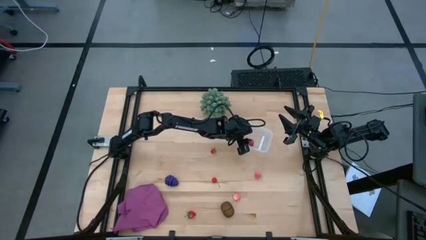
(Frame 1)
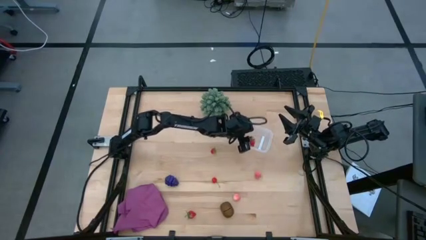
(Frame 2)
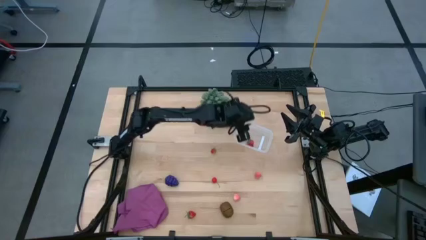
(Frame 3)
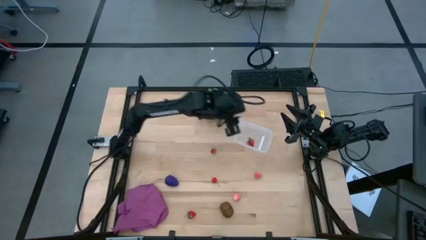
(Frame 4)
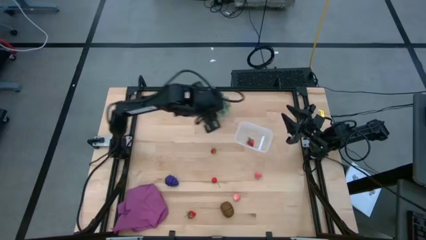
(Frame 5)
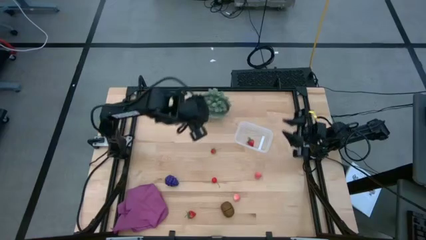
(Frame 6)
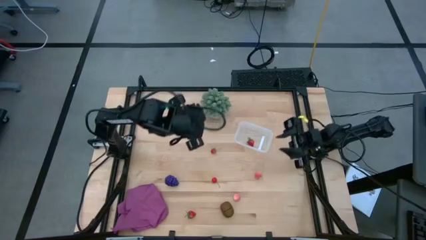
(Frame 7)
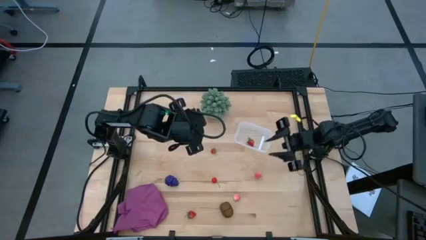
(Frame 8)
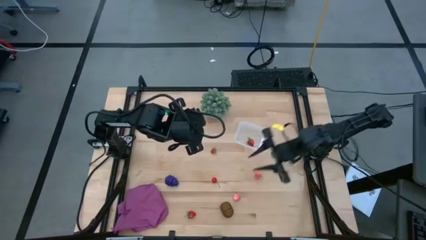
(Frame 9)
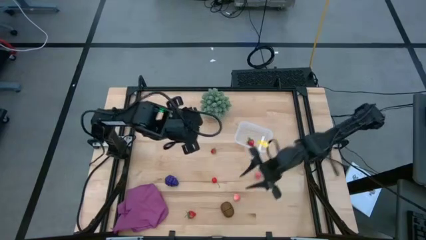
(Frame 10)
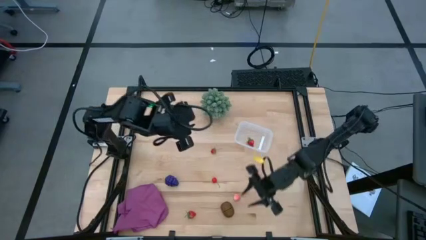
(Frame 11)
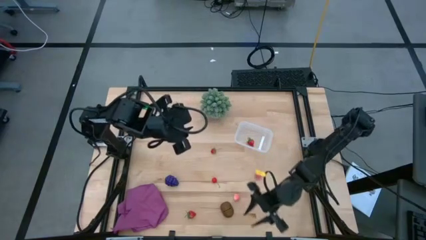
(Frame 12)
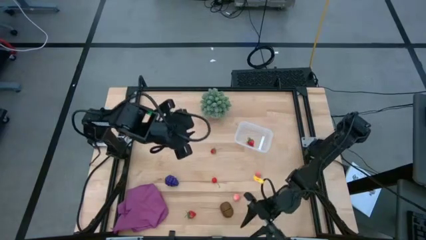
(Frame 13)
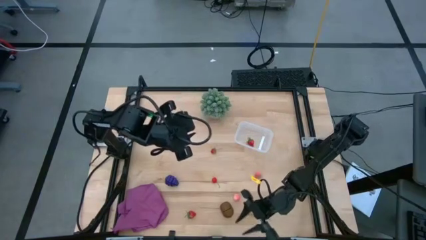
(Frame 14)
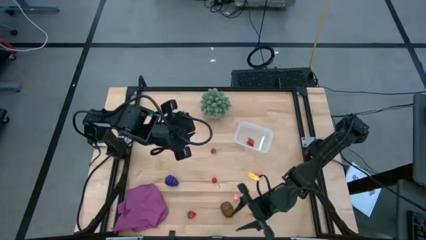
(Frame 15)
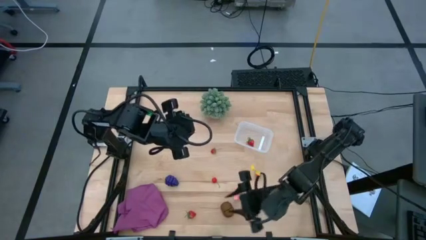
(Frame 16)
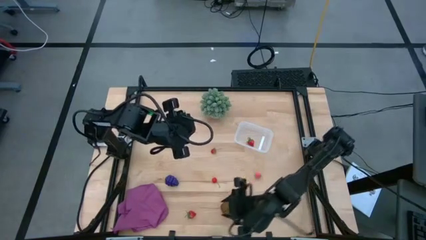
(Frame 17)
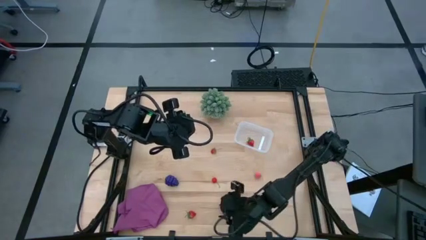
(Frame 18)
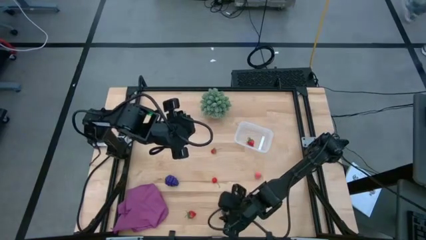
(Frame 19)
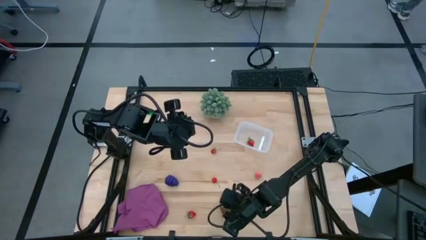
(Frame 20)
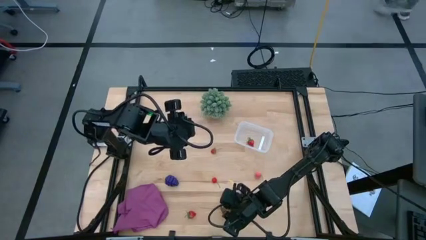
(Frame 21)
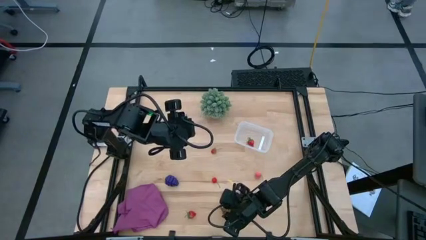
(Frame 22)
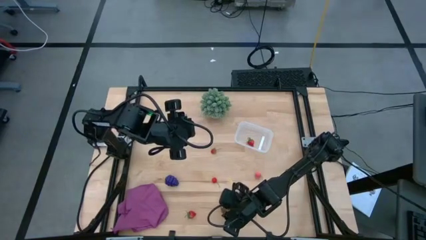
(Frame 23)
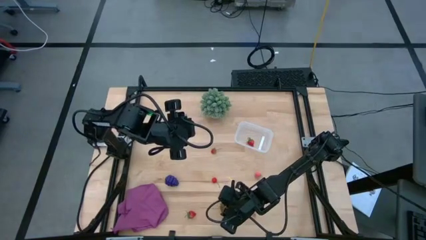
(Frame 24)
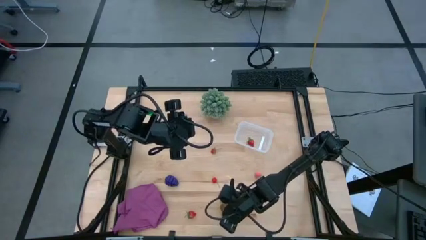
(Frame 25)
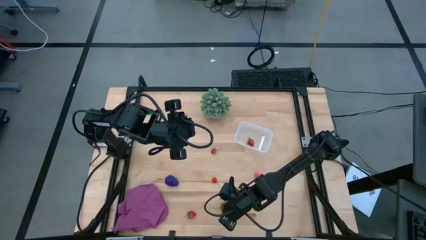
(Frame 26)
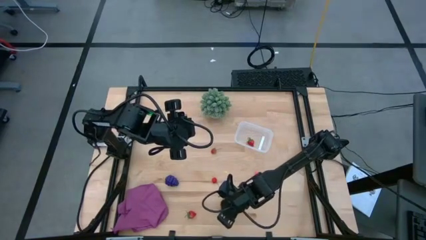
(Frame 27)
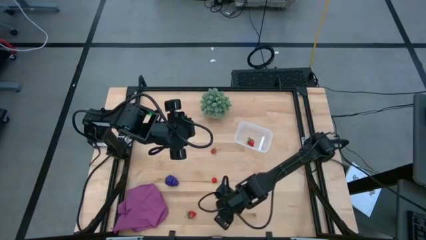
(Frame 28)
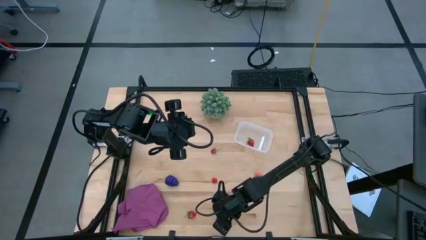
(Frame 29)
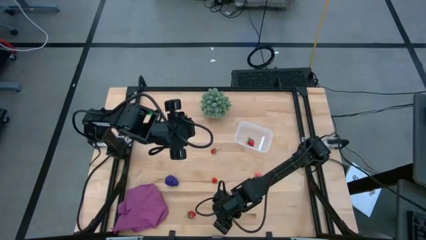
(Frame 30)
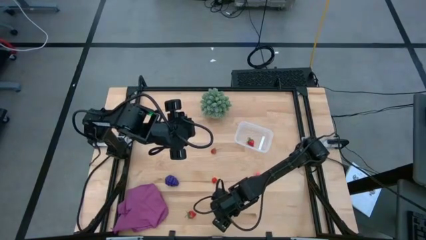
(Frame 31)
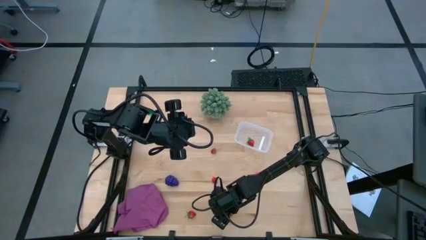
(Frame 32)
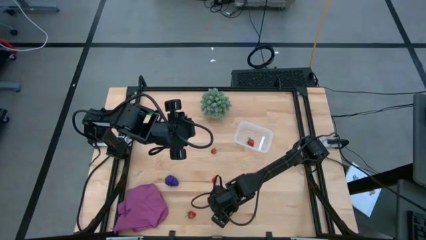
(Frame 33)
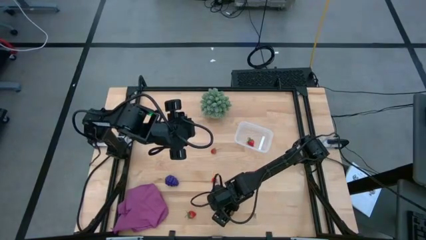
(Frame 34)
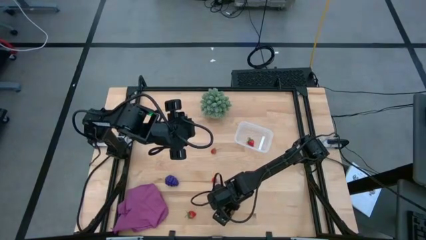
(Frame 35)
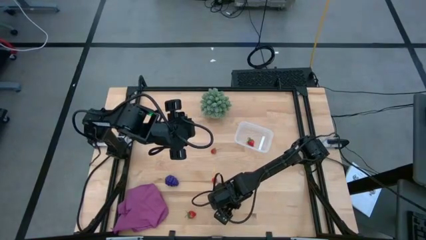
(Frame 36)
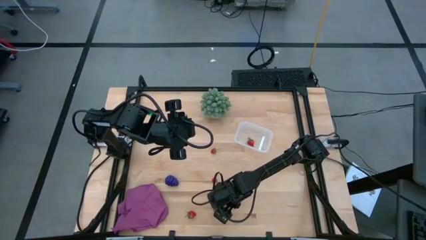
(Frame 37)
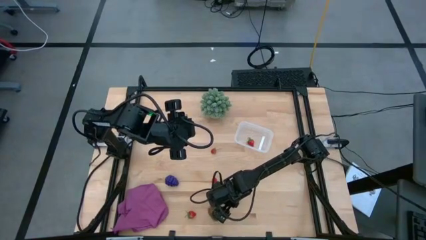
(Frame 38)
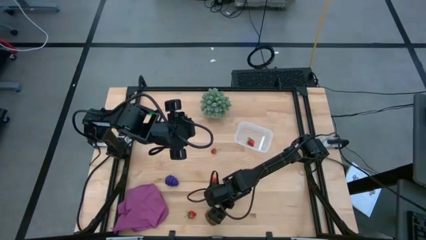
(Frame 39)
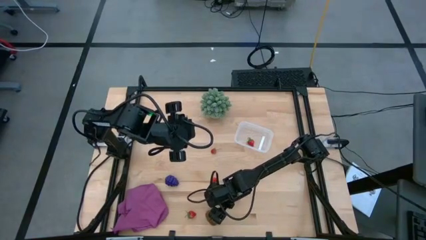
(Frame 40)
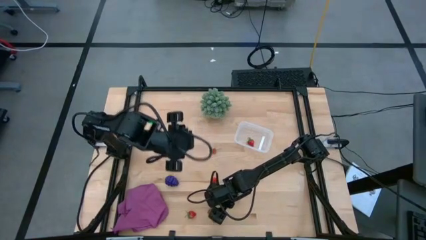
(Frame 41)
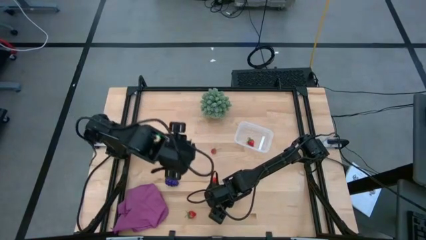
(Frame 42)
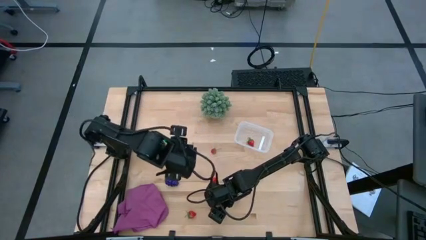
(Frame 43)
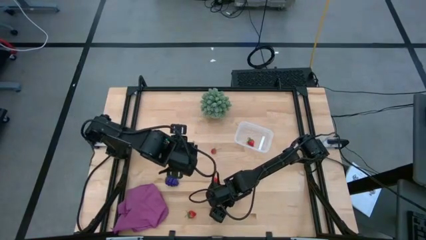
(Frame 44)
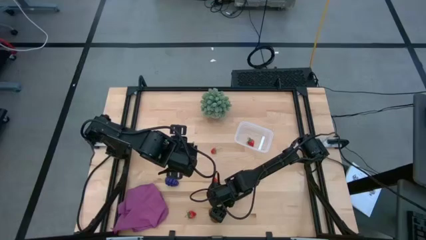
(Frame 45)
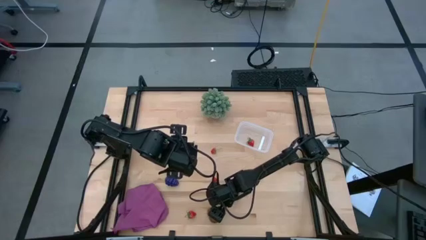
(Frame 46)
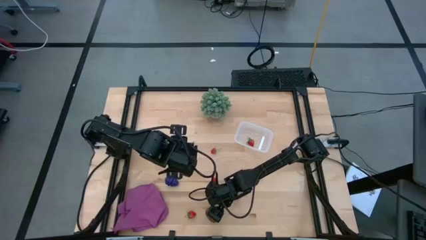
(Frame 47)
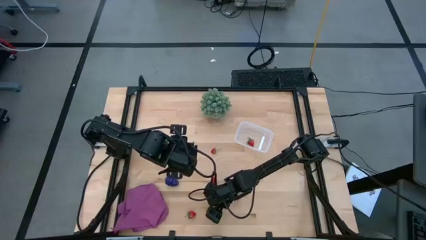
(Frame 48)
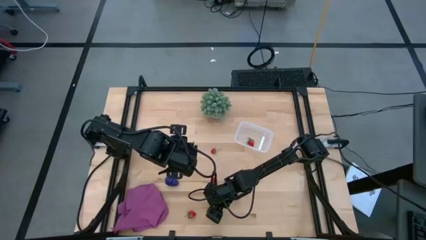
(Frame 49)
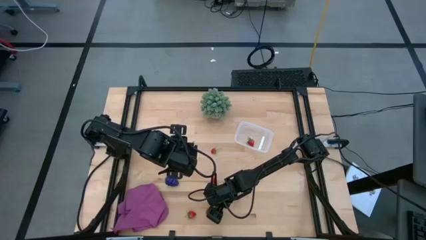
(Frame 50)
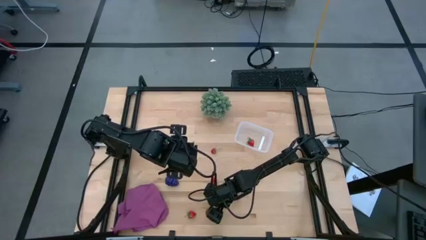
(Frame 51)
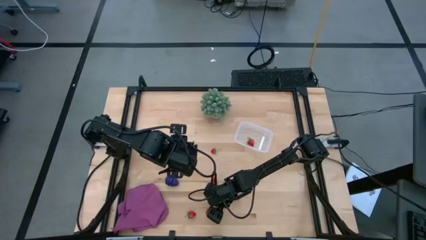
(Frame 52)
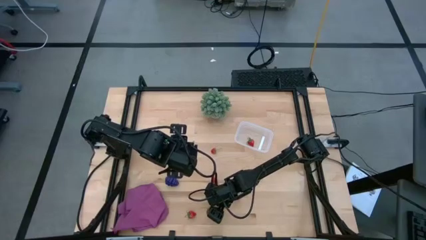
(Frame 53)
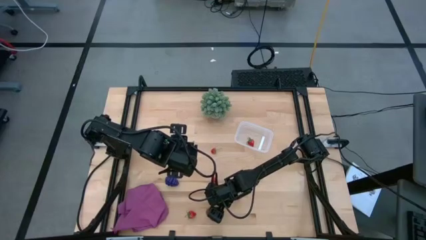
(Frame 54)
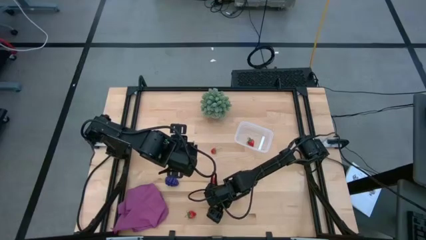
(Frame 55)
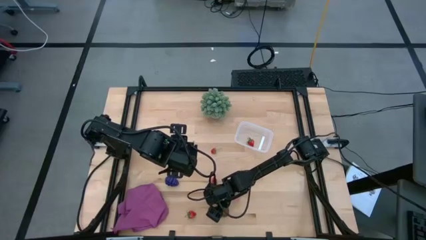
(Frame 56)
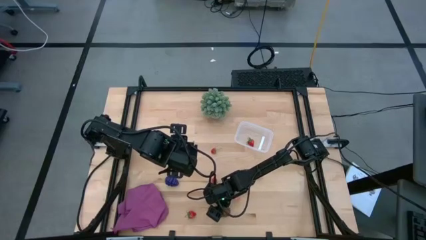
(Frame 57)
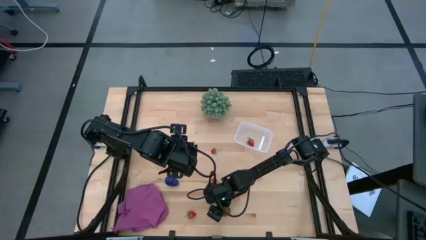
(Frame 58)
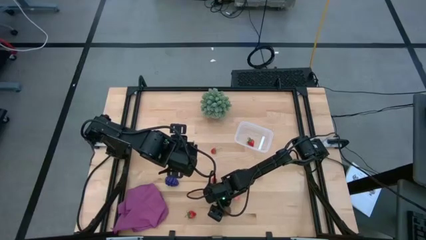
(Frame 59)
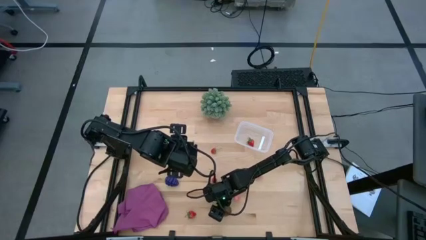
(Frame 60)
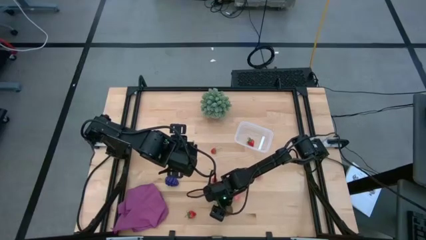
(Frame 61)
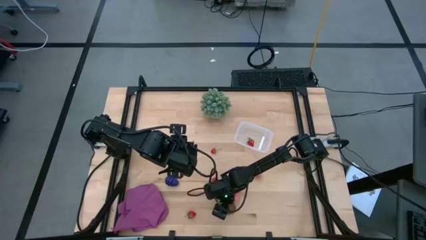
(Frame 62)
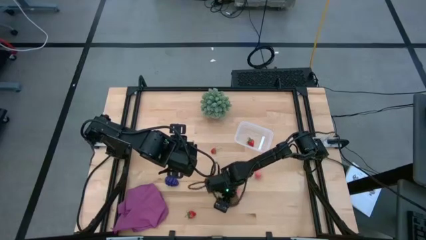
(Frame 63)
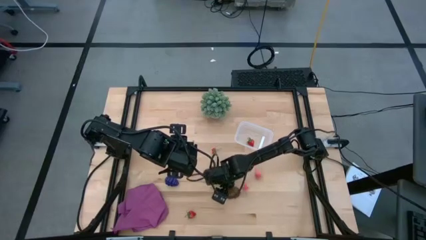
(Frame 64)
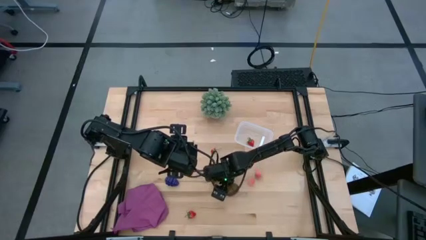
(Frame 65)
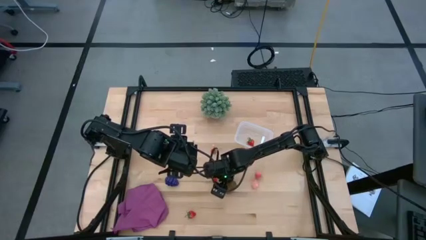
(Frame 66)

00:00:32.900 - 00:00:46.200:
Task: Pick and placing Produce into tupperware
Put the brown kiwi into the transparent bin

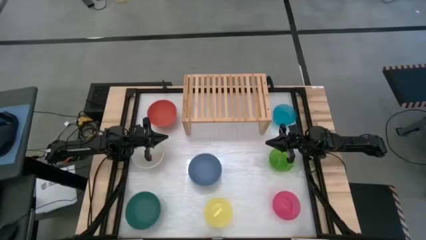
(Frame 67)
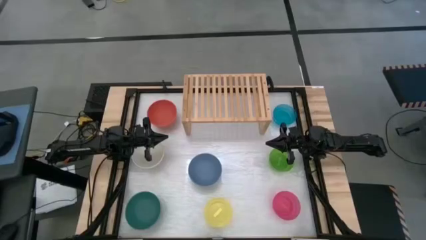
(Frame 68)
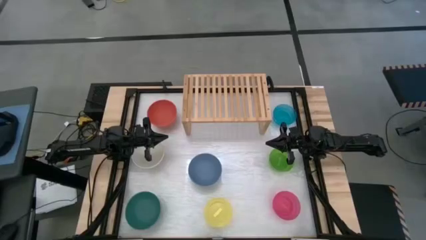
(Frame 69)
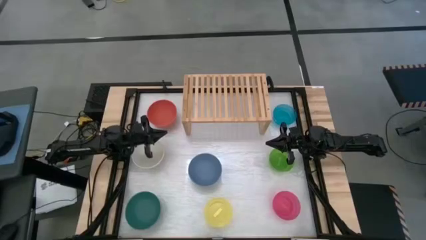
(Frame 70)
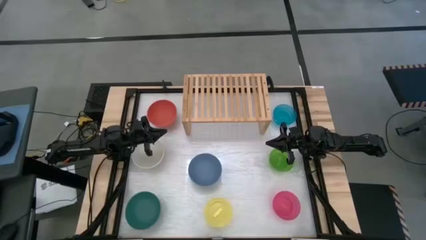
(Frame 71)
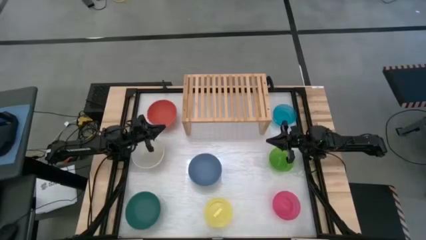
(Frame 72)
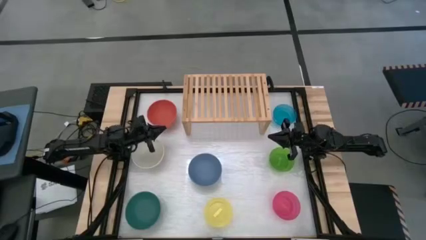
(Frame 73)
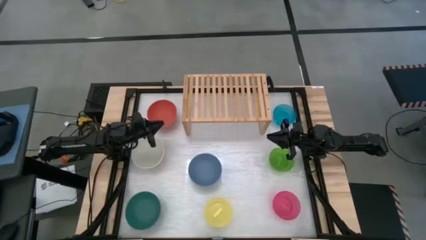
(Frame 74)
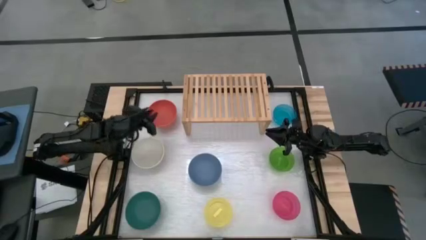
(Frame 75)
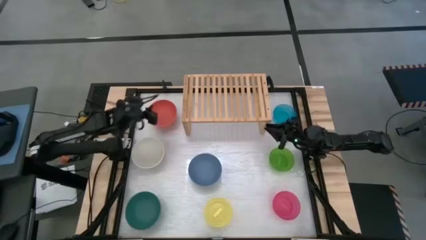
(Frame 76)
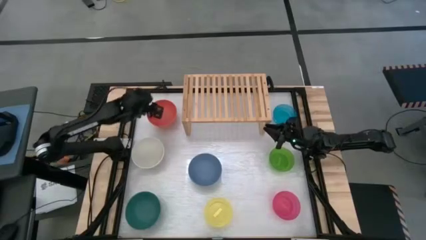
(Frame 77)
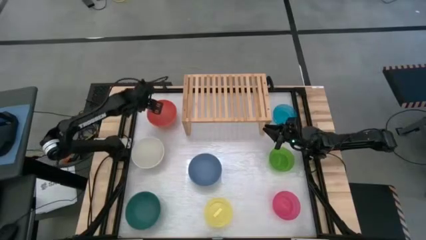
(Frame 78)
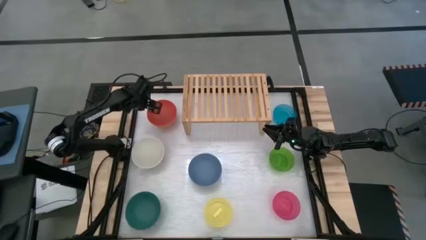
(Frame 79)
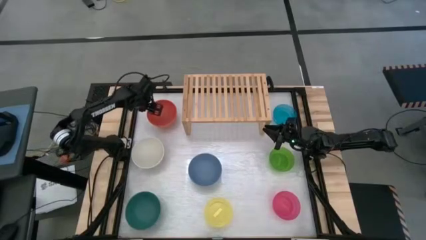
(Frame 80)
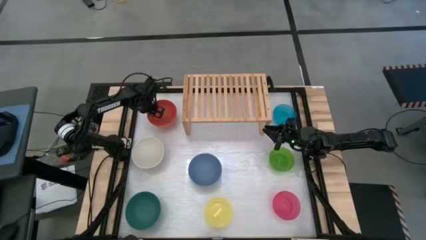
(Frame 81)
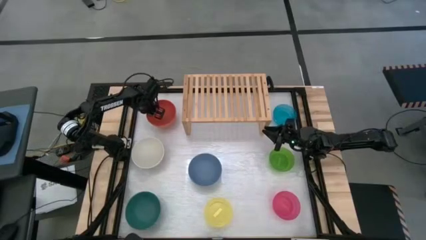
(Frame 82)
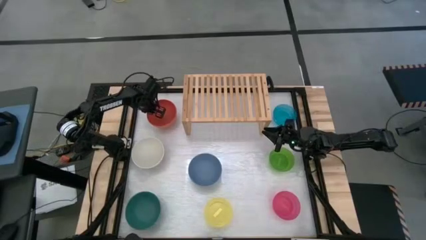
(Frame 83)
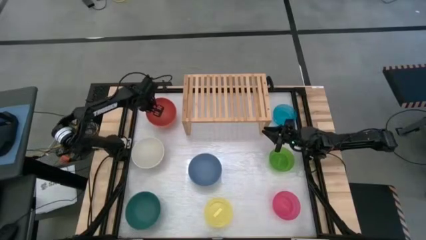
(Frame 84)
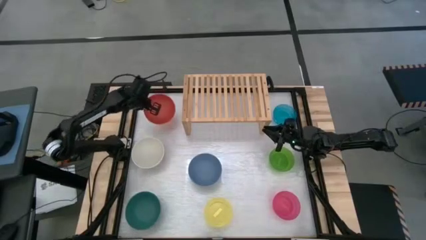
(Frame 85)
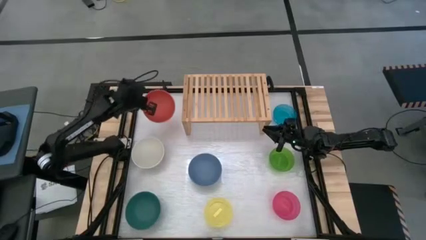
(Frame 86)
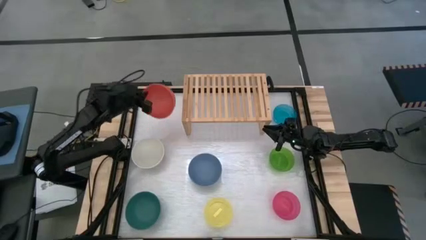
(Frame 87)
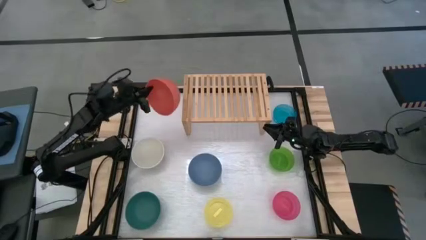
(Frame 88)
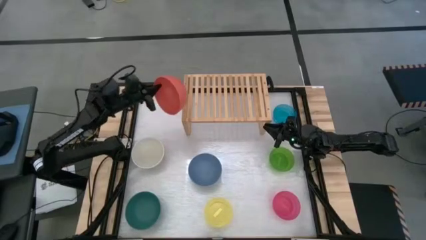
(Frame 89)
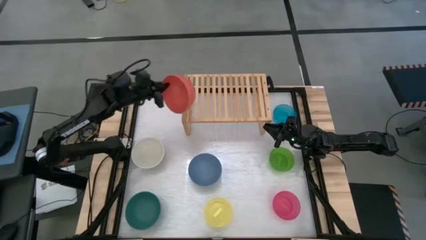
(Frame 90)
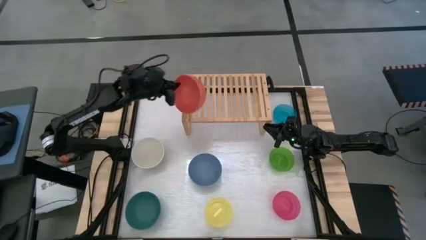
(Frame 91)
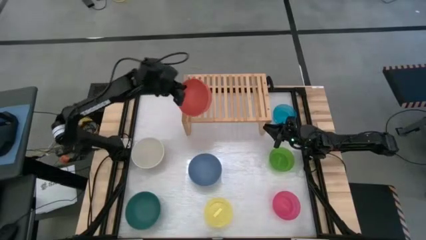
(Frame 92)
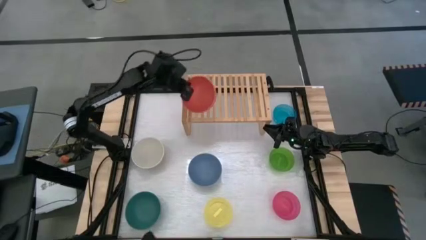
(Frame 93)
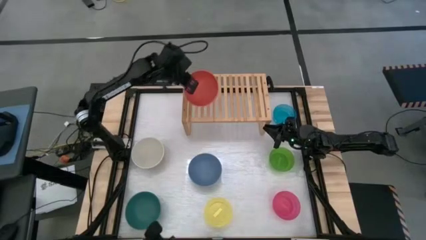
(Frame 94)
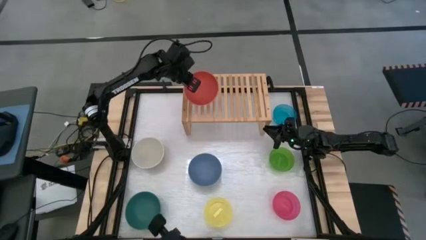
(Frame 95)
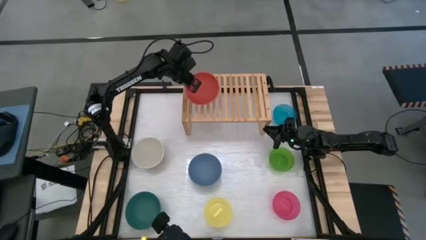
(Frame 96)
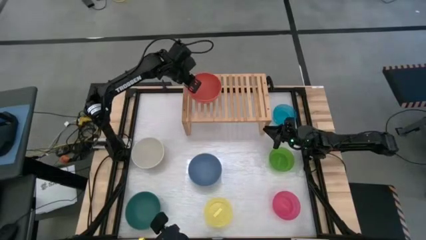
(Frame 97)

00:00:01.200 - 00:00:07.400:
Task: Place and stack bowls onto a shelf
Put the big orange bowl on the shelf
